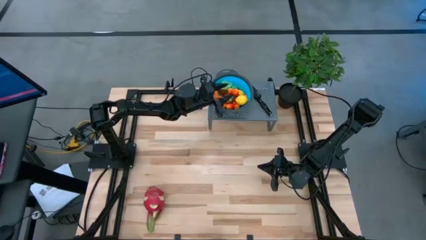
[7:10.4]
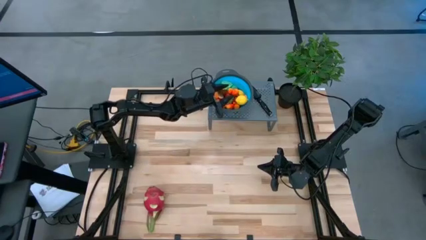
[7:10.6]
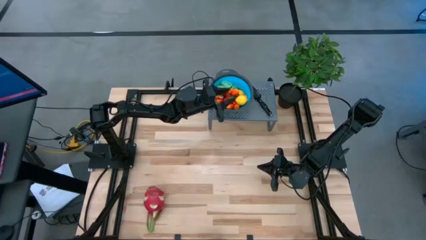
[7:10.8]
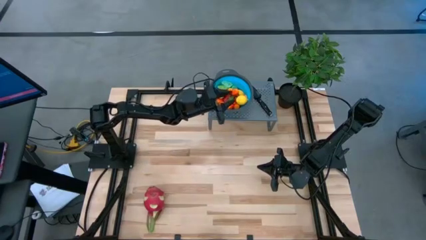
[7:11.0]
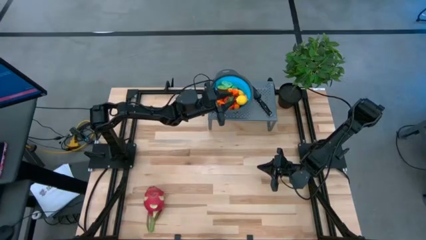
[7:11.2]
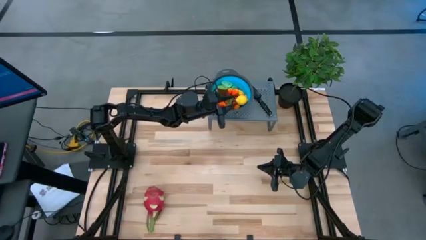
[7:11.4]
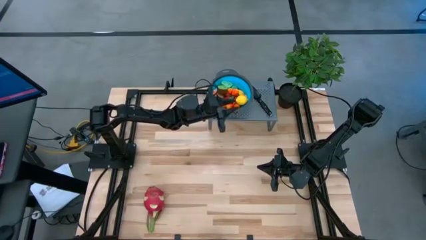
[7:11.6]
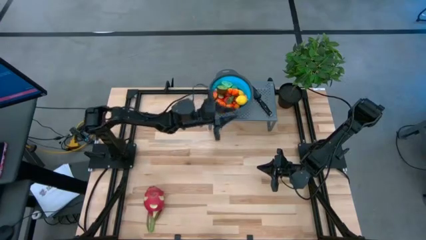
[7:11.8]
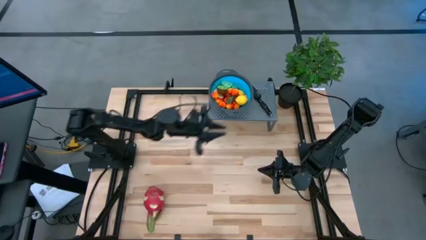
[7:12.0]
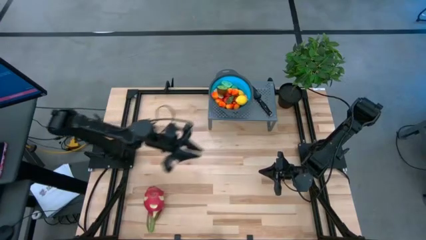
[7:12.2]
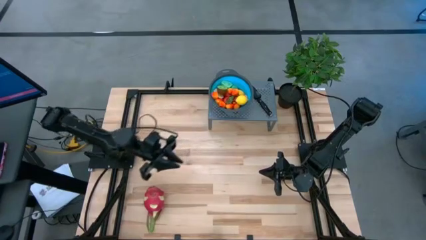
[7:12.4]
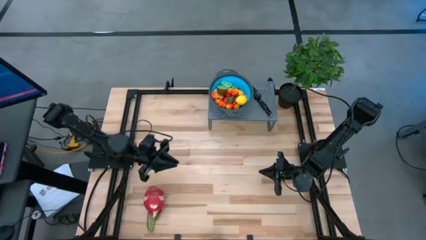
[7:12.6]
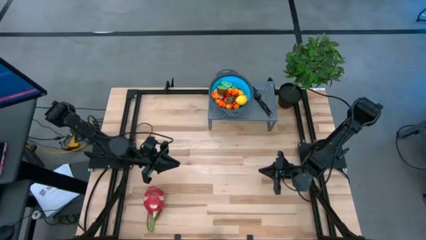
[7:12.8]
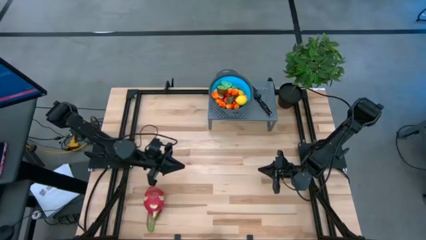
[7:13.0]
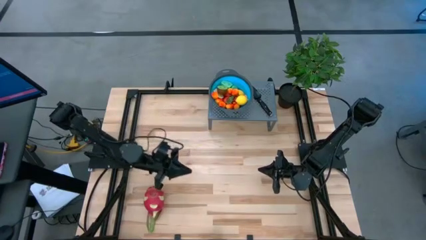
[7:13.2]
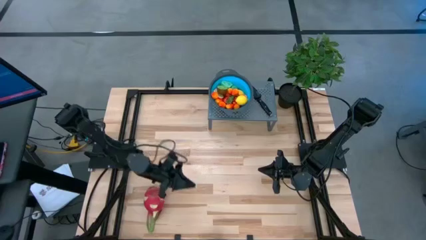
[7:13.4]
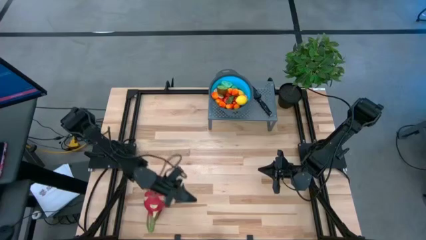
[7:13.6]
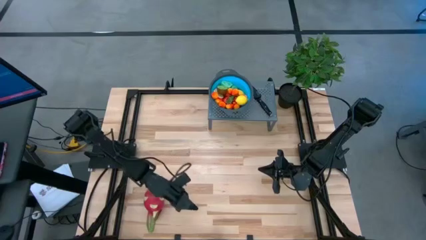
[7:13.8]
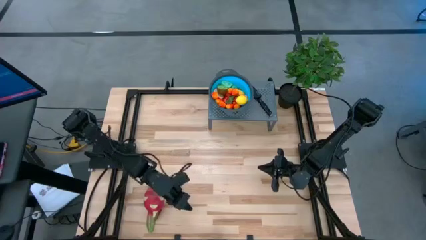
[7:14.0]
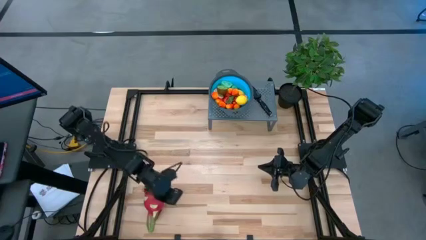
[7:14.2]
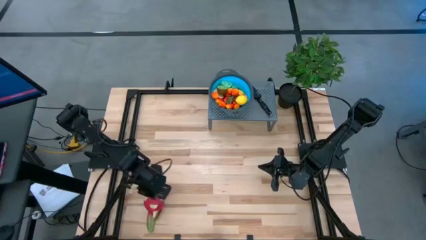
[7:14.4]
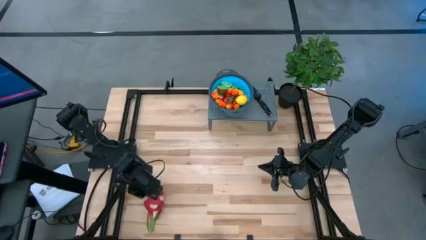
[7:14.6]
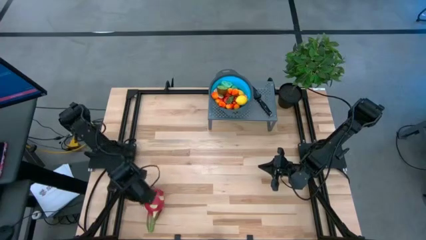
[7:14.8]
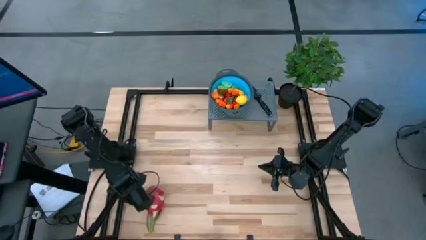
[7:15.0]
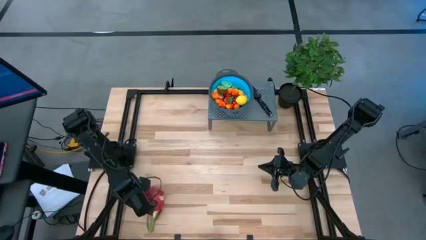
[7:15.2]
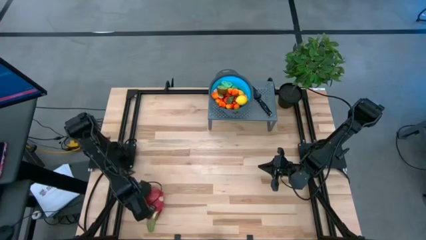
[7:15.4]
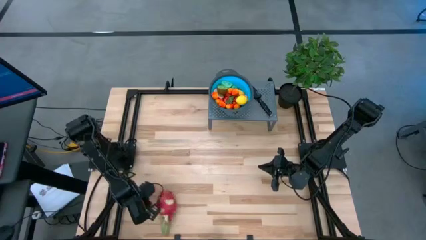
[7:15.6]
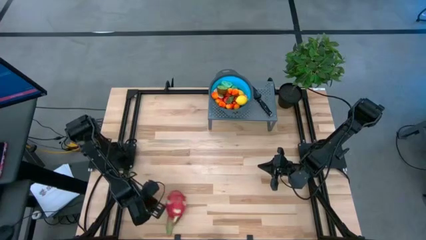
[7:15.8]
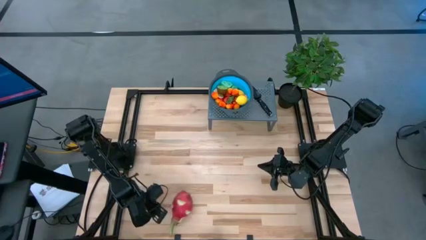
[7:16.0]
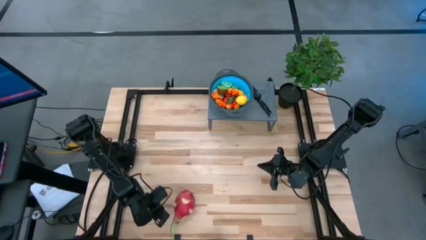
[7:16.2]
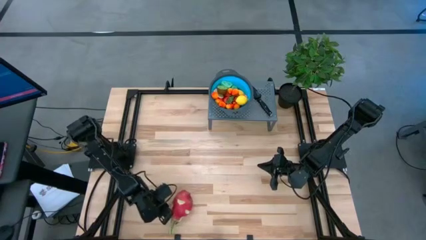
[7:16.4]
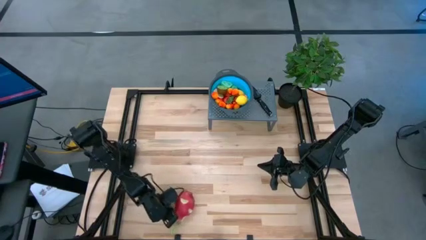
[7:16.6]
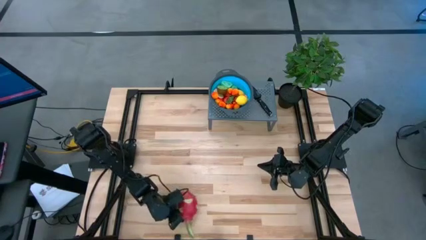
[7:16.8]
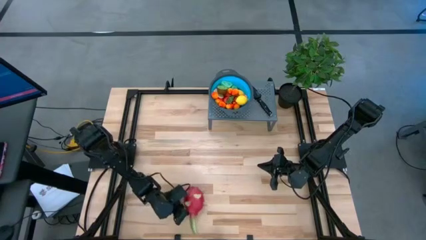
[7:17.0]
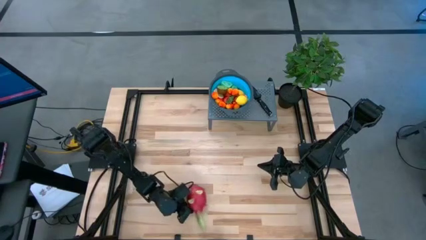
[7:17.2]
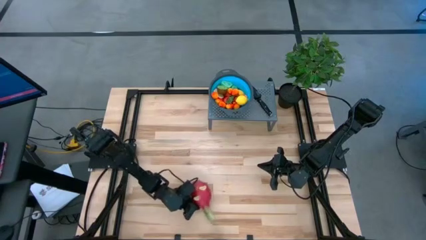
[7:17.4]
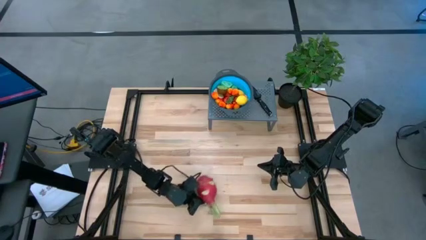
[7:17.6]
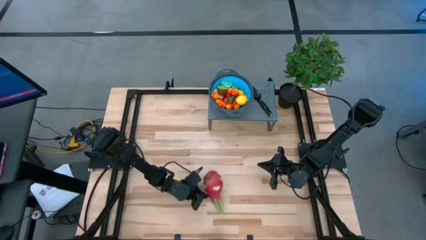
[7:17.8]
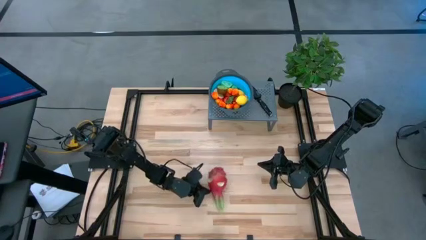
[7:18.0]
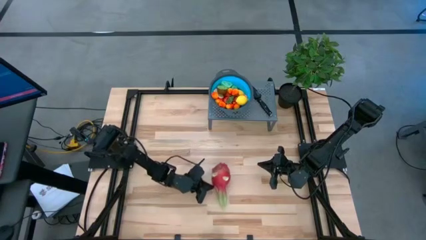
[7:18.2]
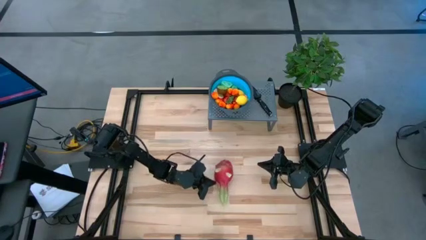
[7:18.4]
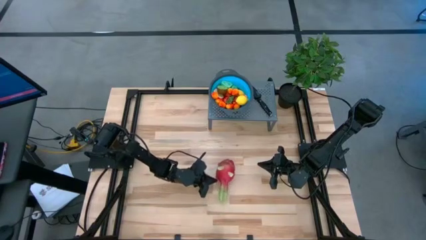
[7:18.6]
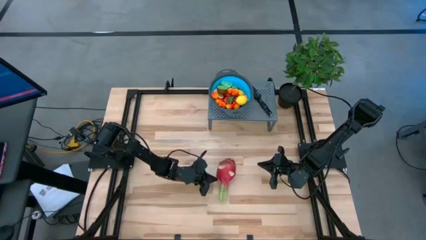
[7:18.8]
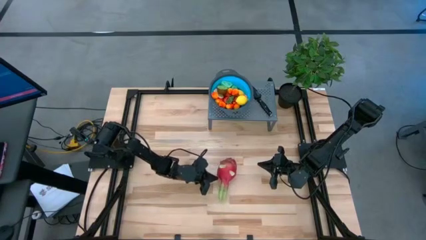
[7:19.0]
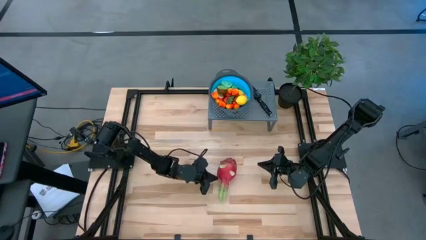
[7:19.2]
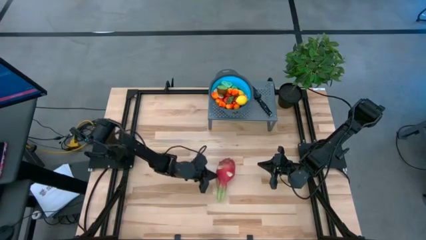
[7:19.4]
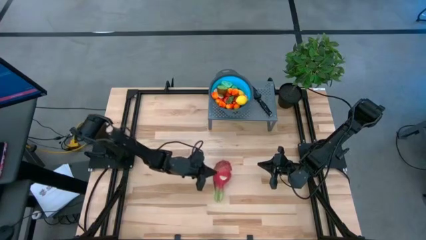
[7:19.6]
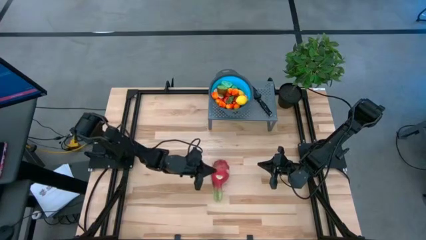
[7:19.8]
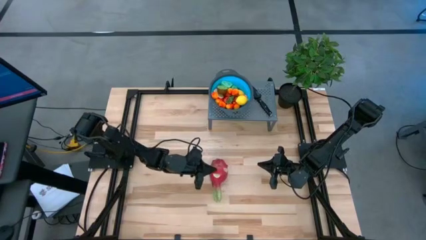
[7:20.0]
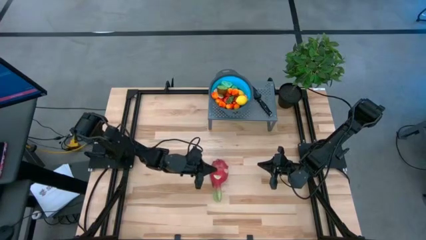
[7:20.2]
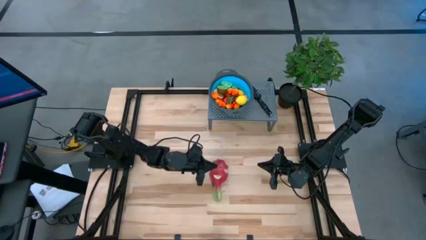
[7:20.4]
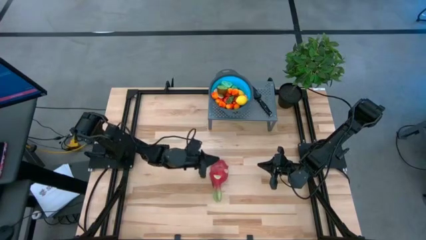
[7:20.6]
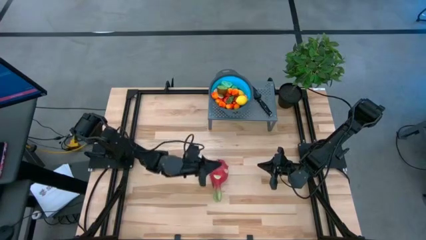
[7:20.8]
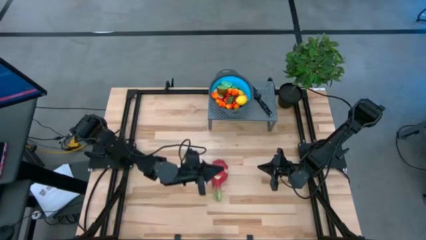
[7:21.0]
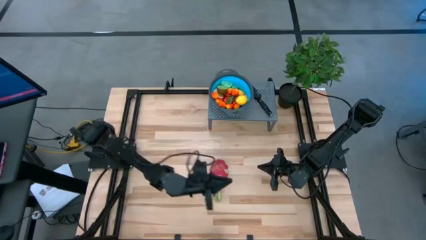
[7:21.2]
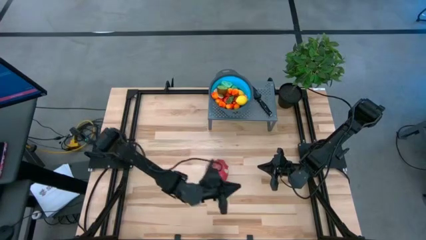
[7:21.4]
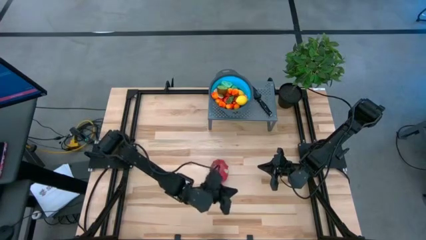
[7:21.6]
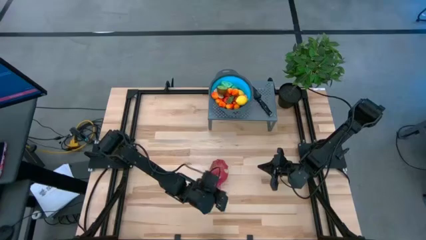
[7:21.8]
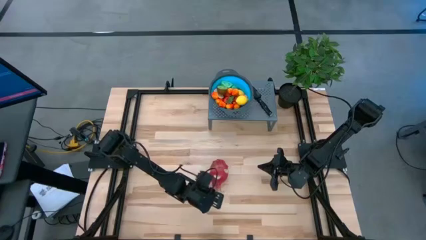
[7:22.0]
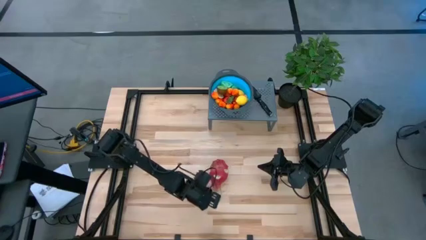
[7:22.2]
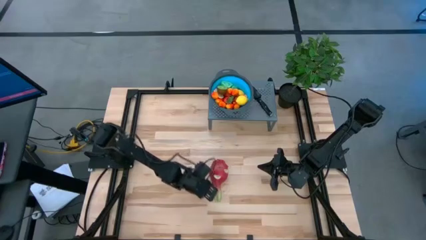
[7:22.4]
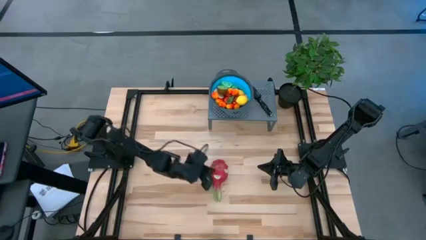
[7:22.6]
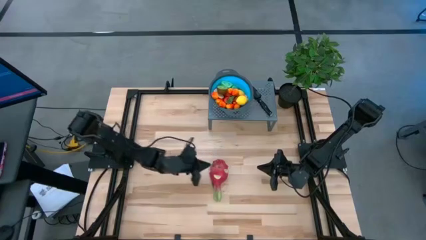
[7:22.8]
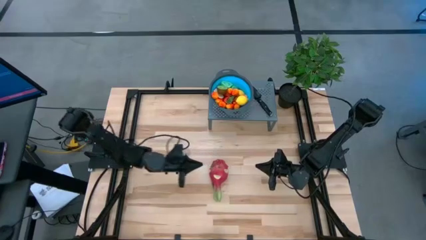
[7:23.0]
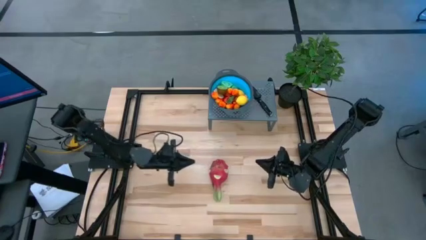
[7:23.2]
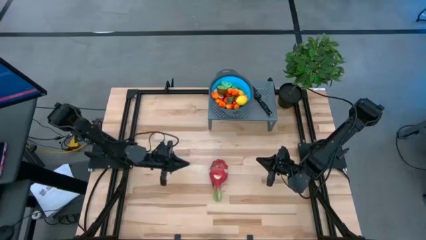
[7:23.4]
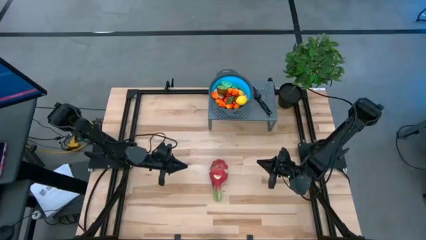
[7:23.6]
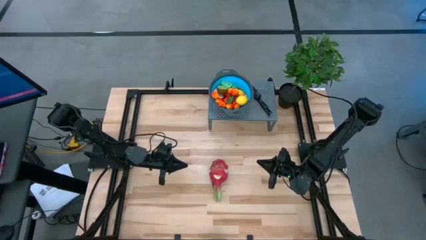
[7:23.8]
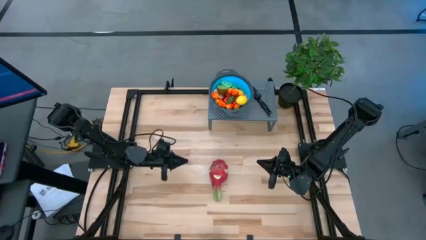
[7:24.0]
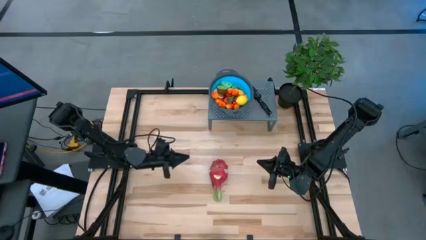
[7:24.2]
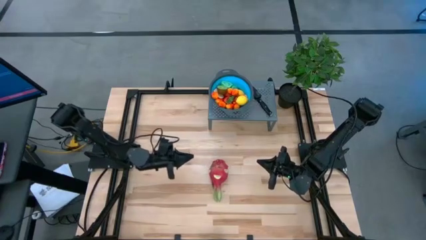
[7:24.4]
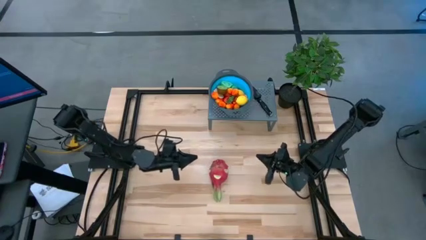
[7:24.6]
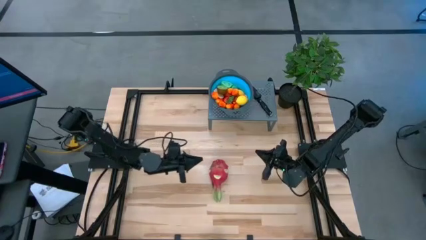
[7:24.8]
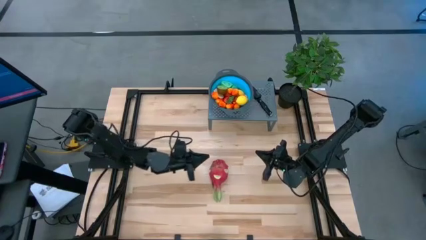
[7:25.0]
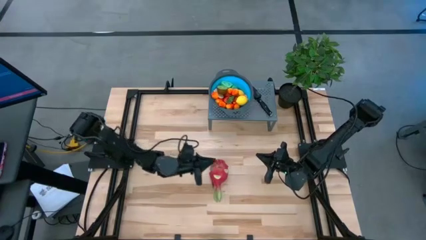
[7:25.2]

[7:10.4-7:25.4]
Task: Pick & Place Fruit
Put the dragonfruit into the strainer bowl

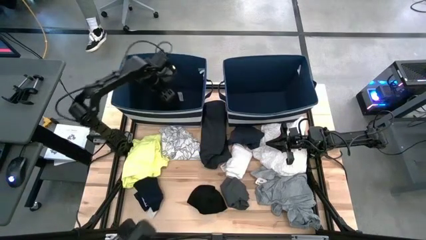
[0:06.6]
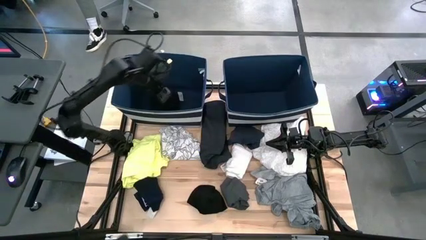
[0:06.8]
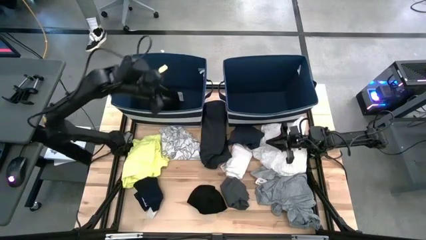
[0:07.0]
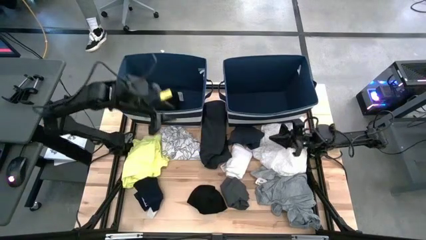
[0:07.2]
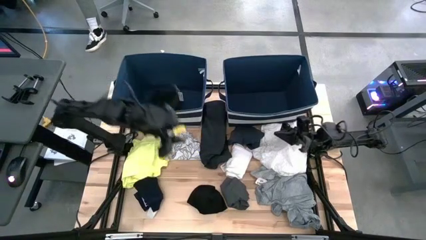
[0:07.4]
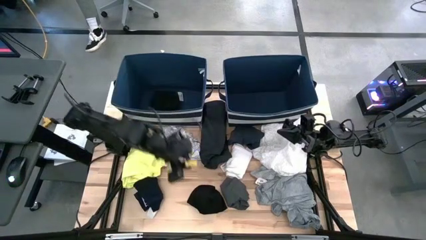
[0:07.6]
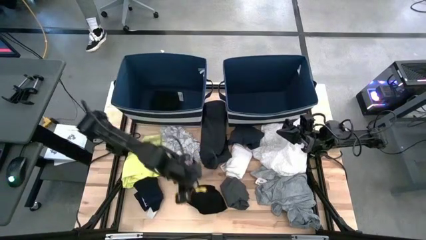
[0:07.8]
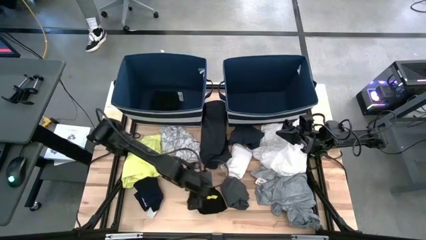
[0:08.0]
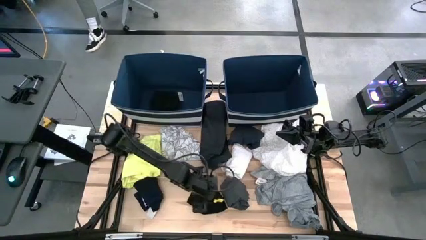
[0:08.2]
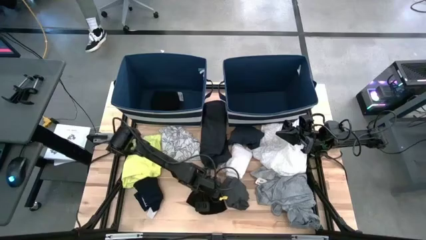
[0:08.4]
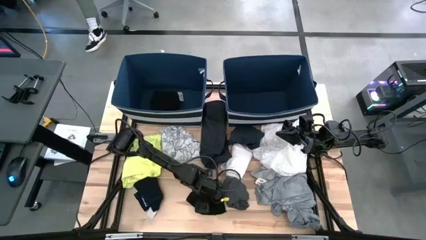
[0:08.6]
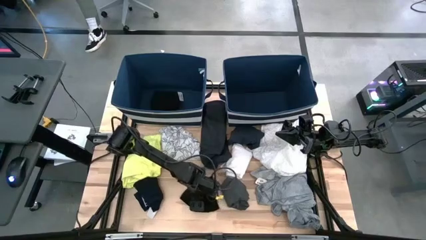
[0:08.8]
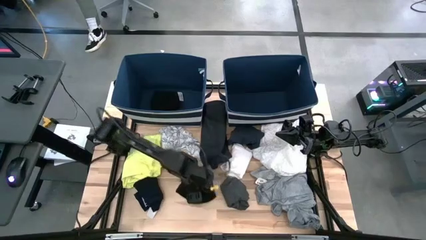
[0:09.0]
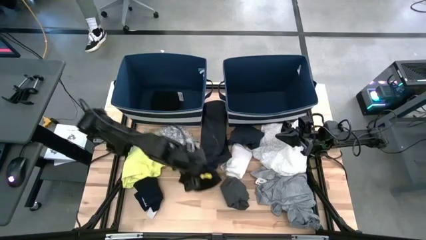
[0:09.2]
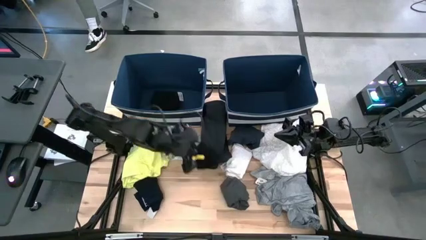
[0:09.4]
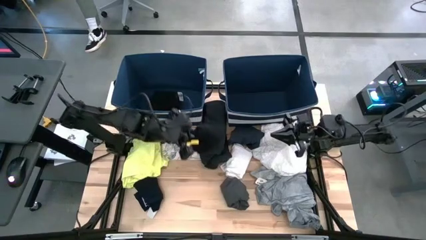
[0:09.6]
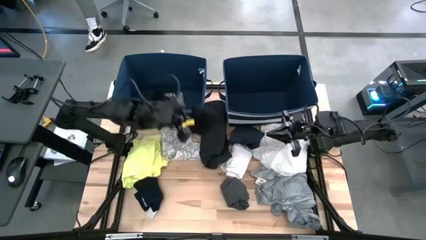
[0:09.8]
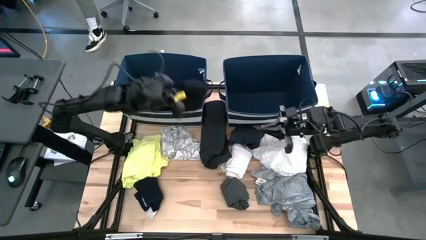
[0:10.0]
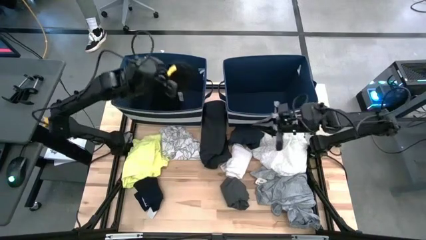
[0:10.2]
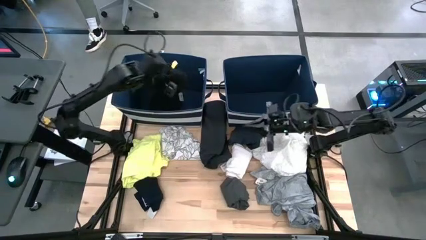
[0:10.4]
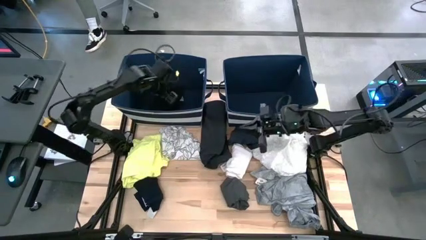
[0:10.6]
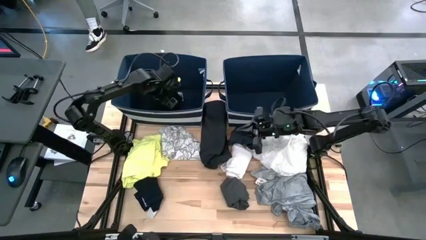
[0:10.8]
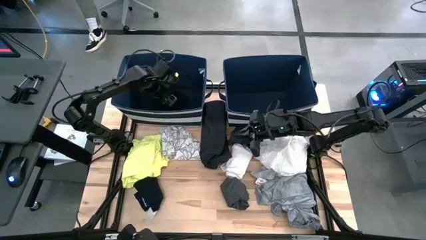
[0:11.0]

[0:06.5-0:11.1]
Task: Sort clothes
Put the black shirt into the left blue laundry bin
